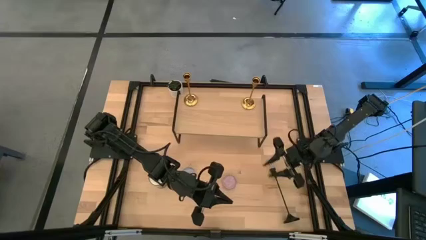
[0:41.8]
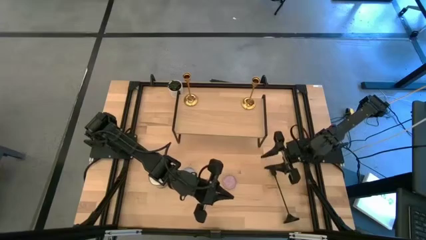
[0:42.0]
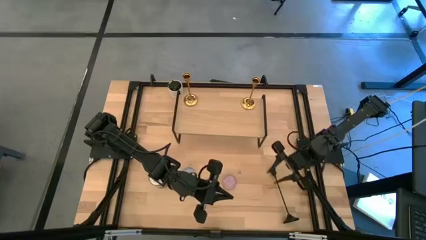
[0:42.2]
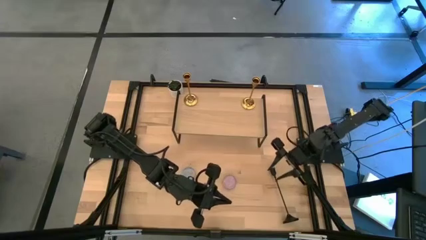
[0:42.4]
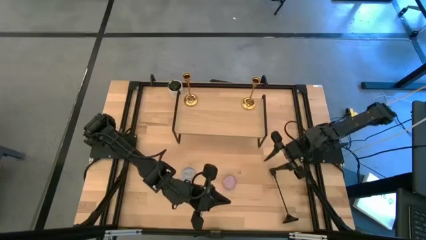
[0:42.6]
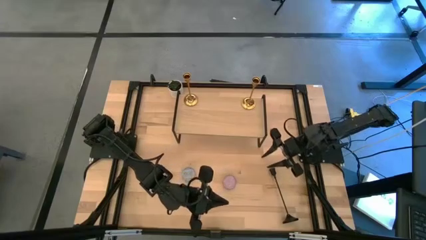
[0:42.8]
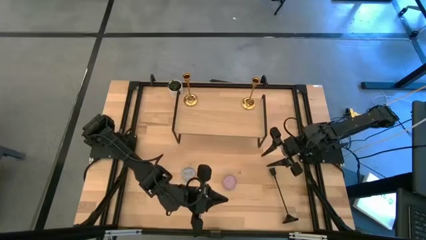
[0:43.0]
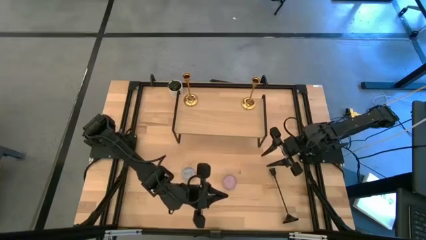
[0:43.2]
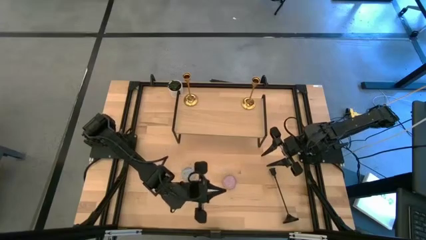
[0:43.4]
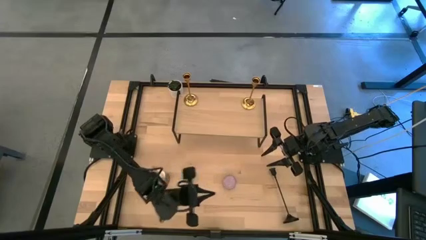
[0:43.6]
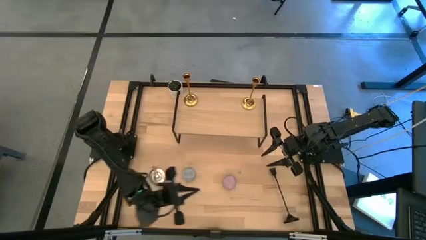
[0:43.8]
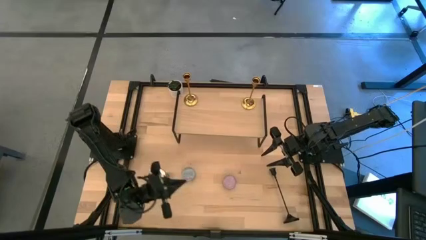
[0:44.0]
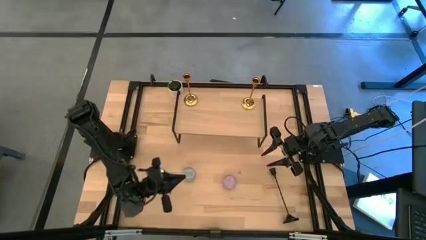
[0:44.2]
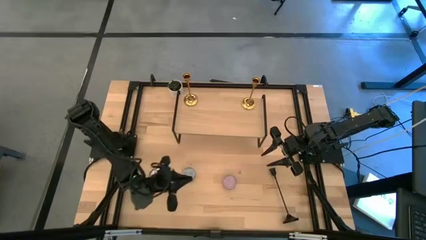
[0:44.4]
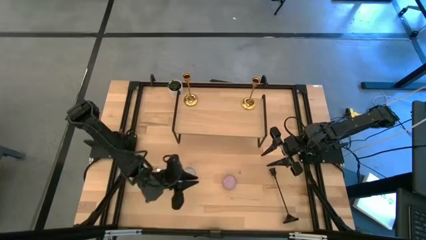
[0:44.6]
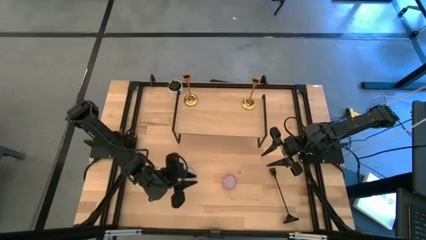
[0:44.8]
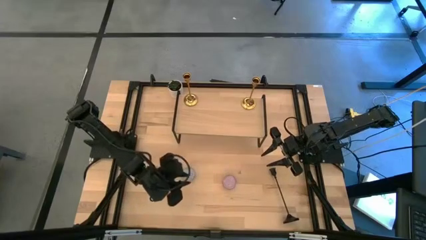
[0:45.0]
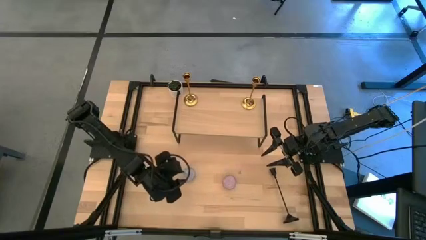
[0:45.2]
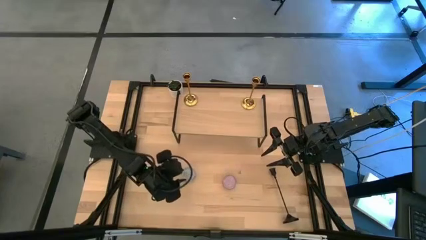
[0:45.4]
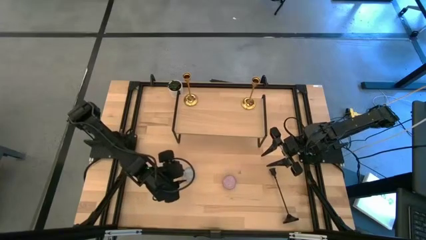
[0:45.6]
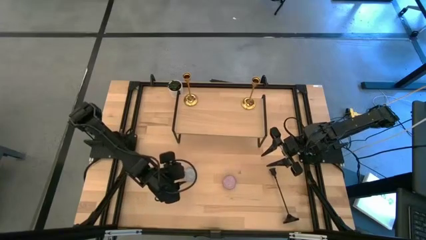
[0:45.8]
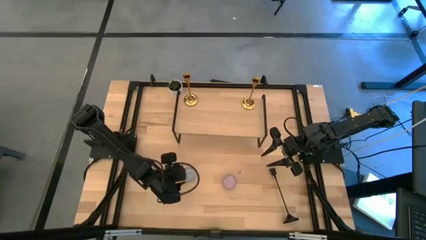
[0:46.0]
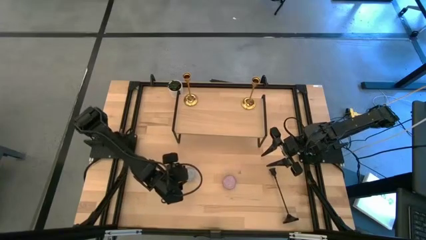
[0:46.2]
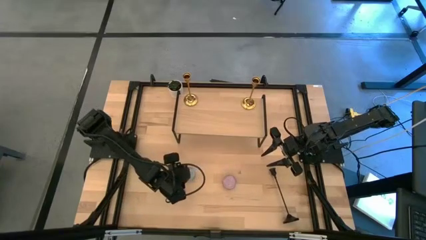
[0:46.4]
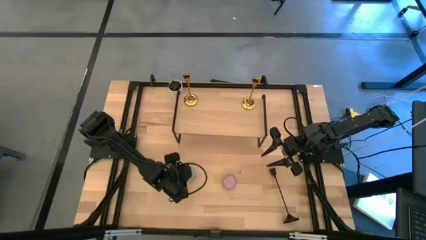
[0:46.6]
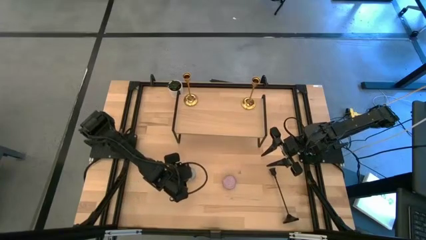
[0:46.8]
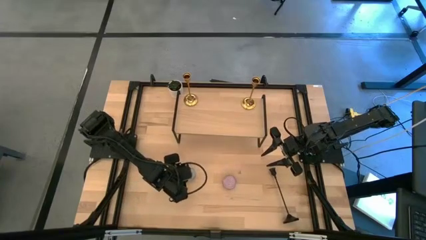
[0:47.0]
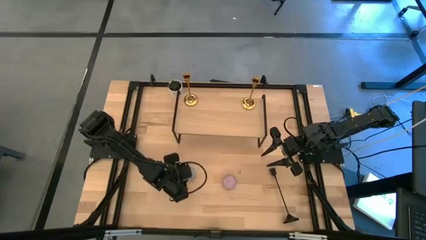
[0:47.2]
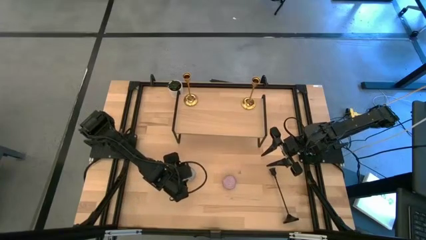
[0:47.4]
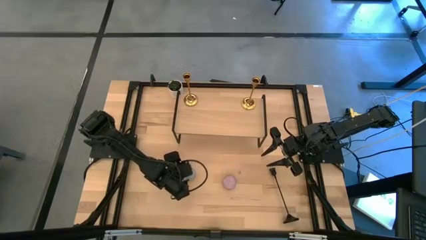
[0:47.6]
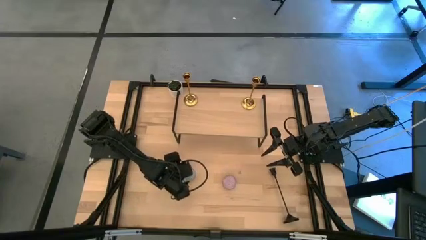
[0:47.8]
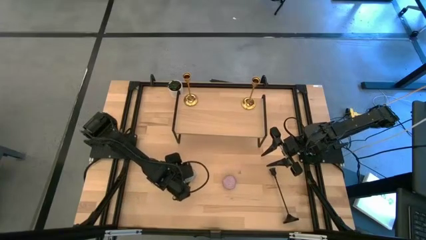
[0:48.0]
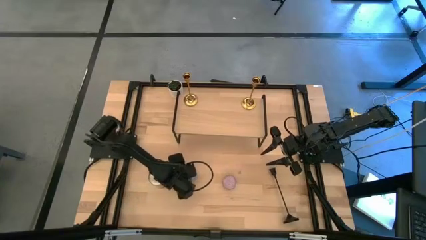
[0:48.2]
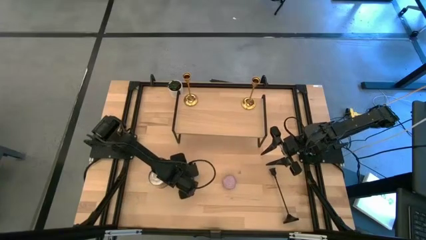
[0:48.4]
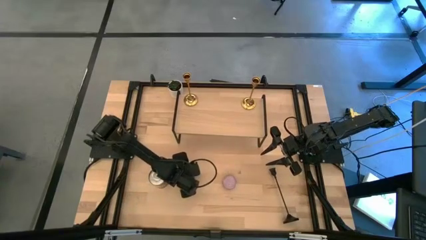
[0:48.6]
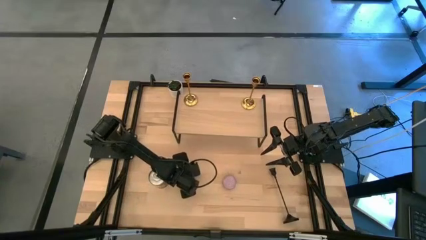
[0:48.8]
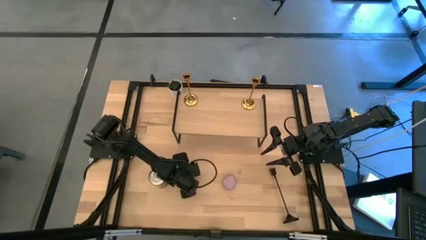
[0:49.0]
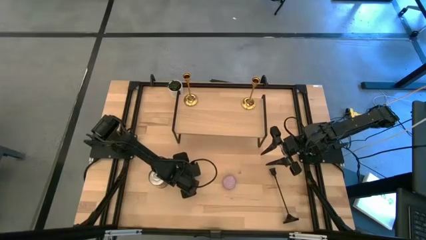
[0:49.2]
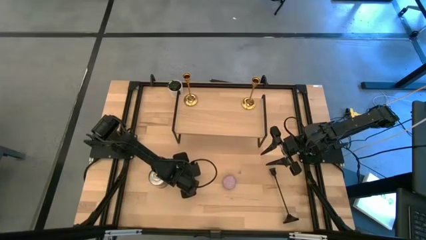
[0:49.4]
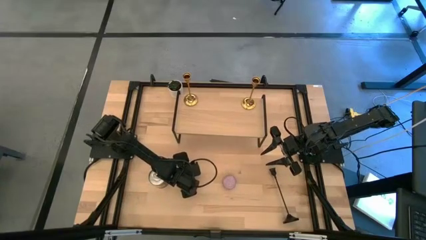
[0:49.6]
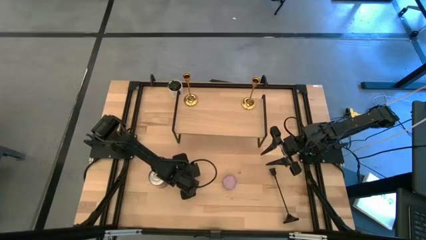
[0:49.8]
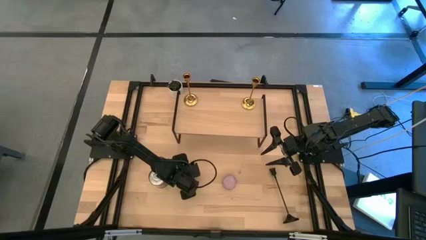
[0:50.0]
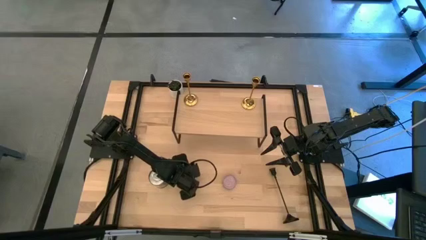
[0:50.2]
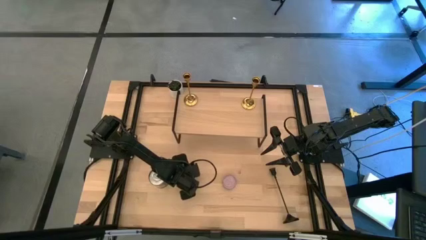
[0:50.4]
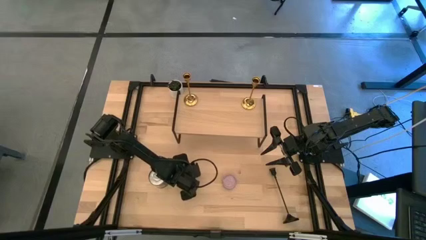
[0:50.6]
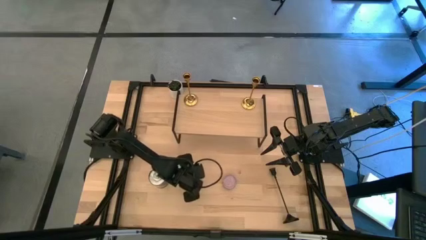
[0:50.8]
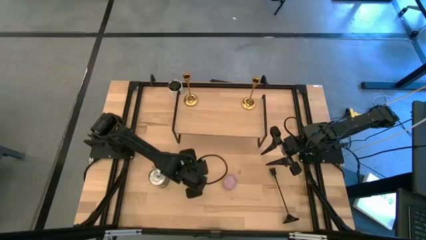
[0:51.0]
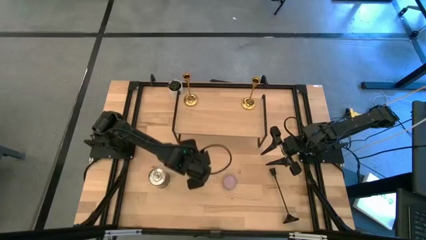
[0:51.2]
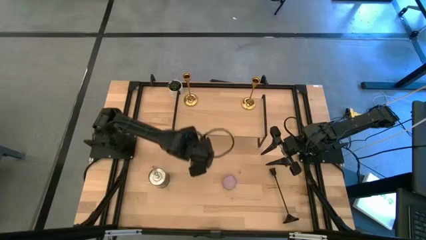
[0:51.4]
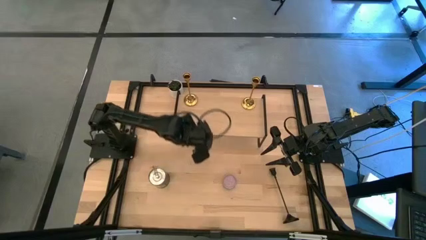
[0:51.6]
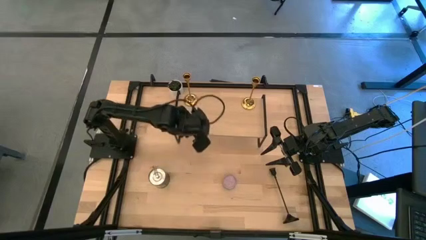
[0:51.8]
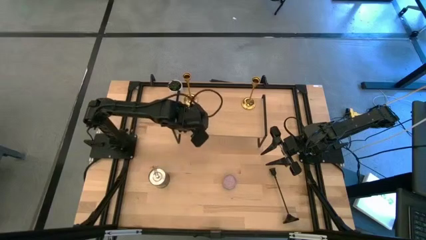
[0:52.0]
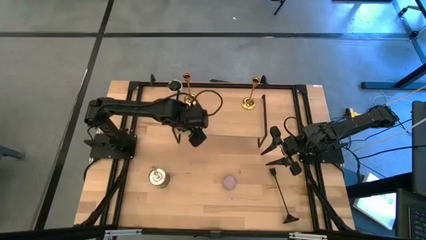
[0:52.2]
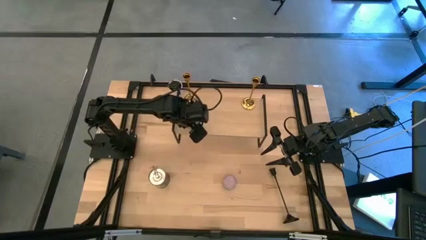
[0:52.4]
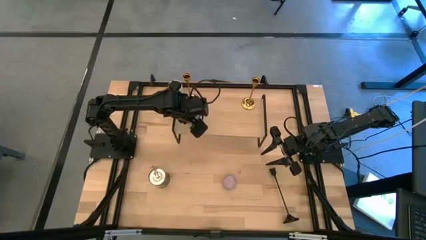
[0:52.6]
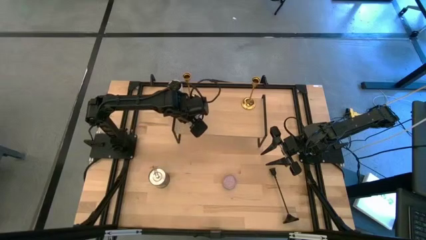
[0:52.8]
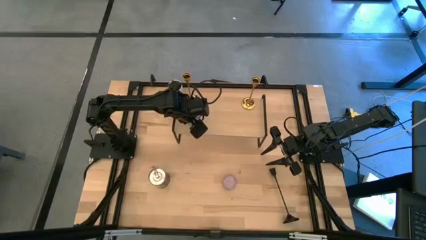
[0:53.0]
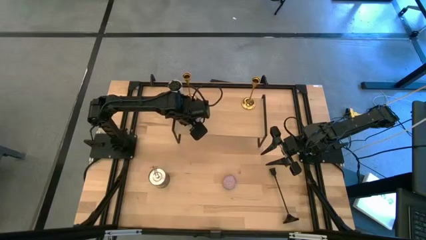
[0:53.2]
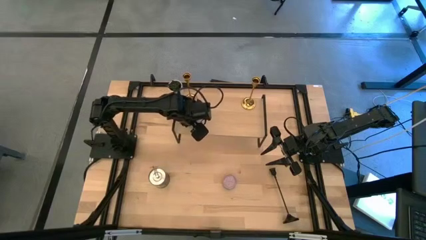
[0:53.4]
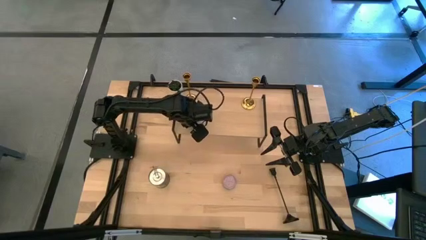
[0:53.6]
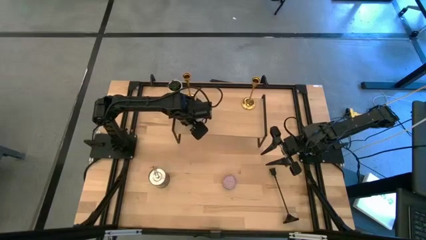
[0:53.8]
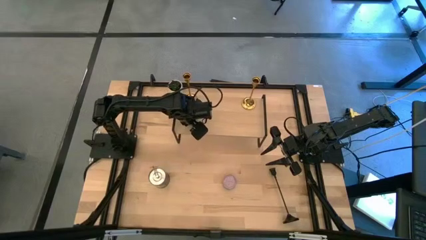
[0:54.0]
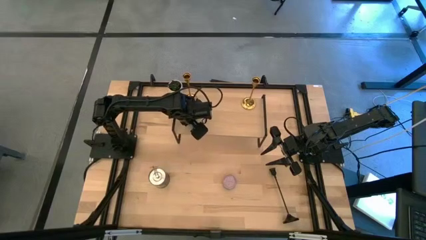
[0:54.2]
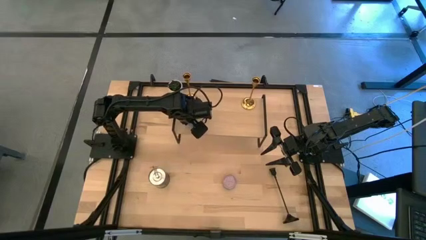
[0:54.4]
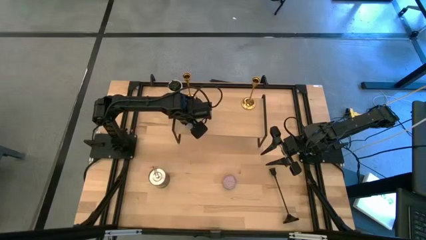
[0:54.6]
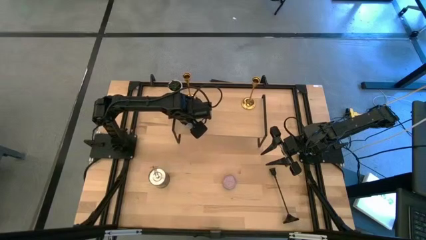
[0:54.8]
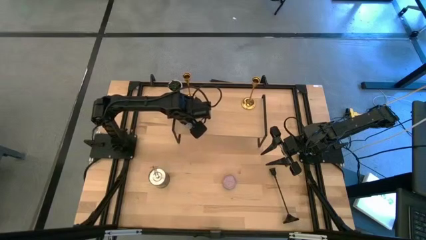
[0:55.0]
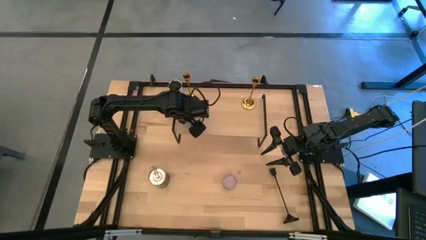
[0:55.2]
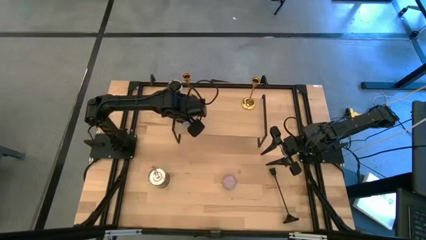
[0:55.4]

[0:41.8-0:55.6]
Task: Pick & Place candle stick holders
Put the blue scented candle on the shelf
